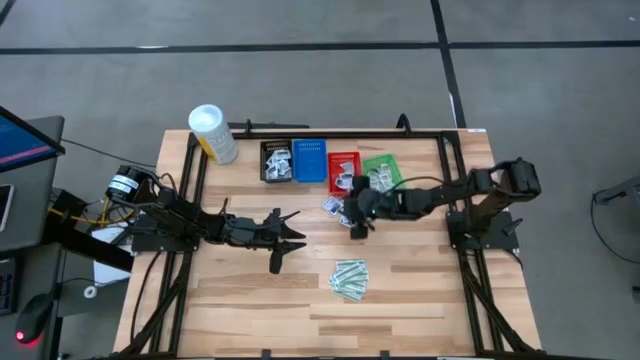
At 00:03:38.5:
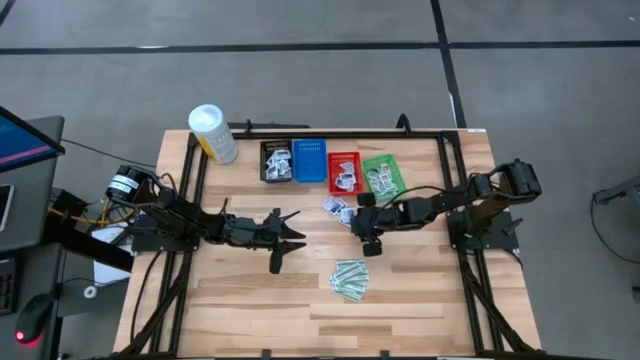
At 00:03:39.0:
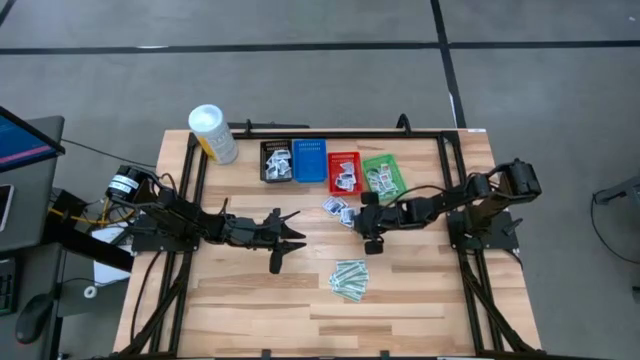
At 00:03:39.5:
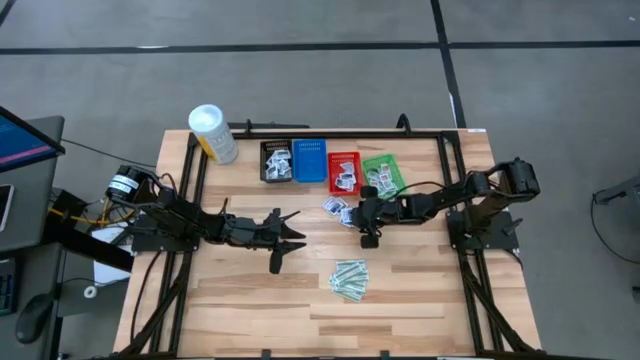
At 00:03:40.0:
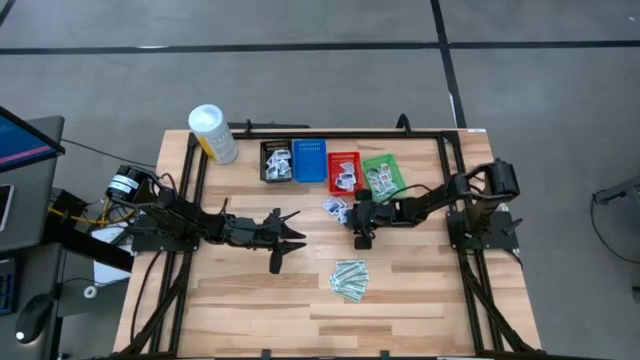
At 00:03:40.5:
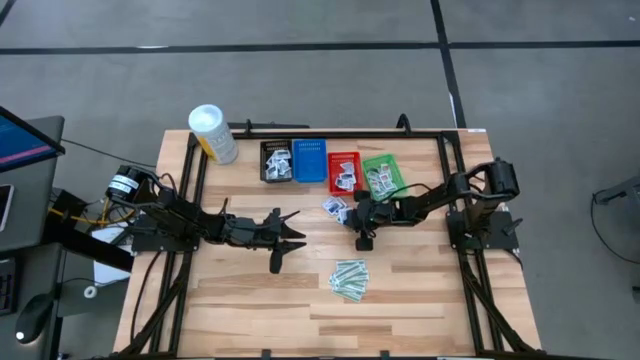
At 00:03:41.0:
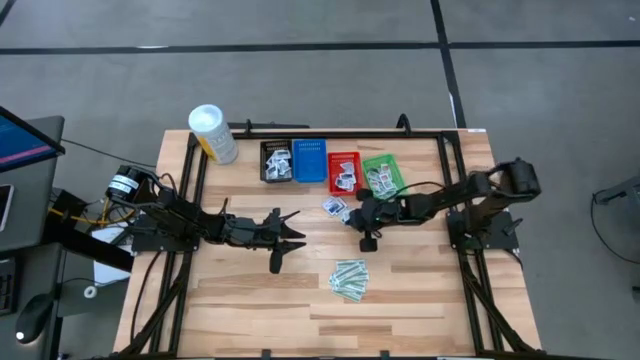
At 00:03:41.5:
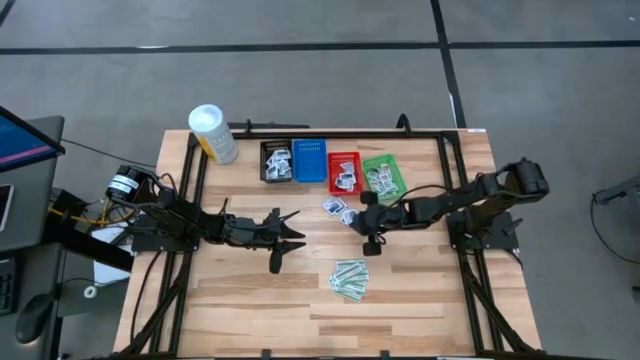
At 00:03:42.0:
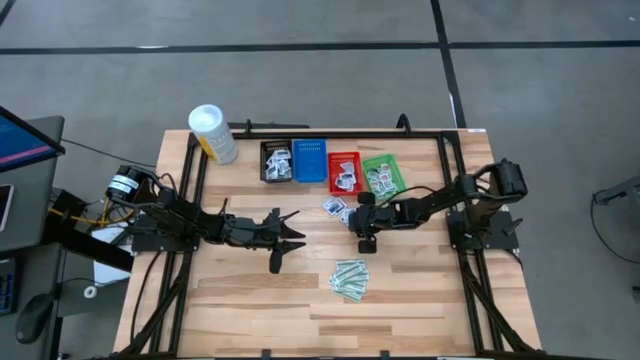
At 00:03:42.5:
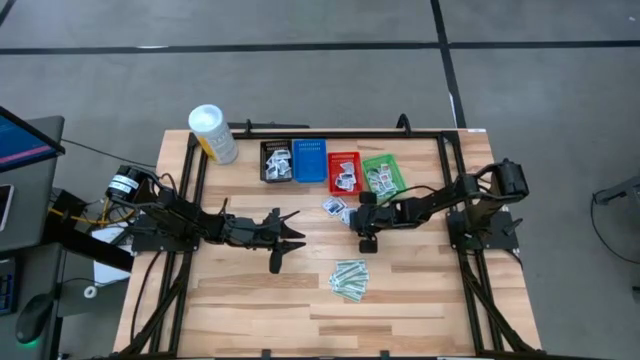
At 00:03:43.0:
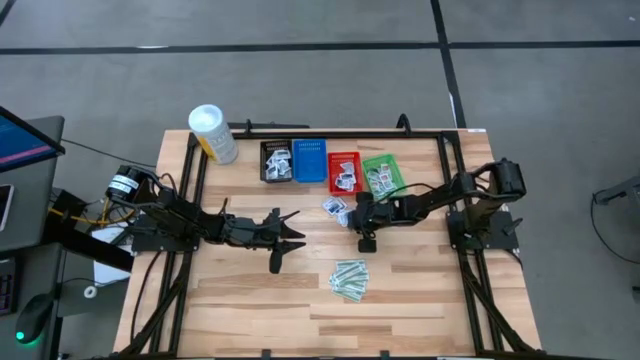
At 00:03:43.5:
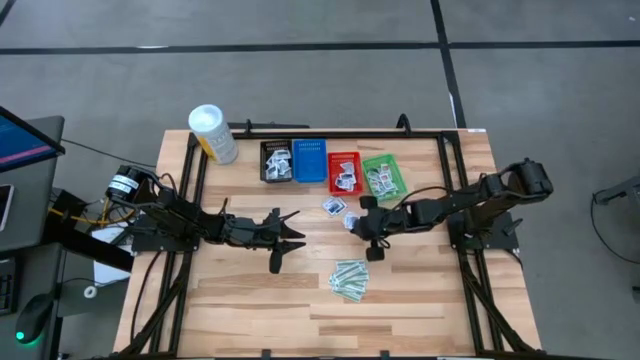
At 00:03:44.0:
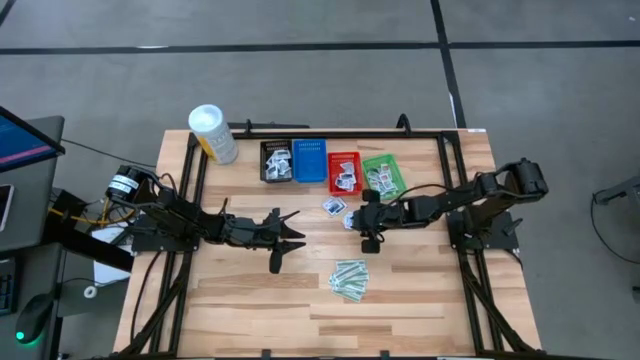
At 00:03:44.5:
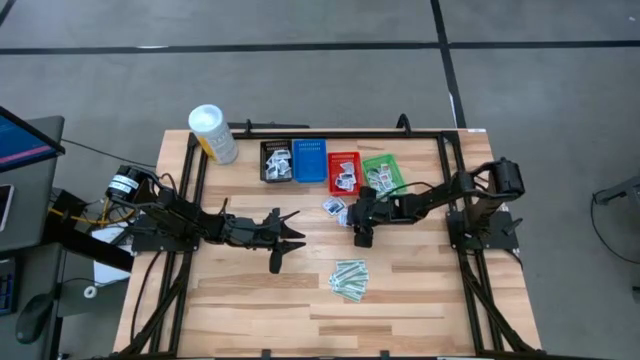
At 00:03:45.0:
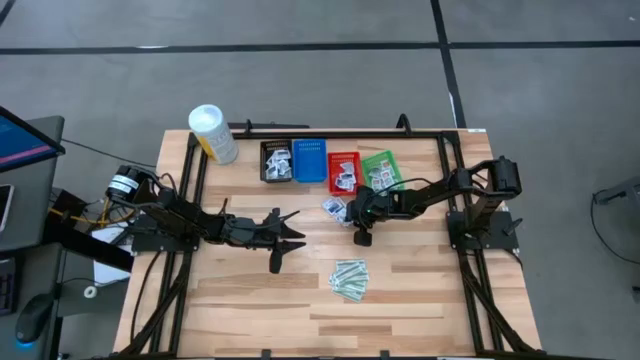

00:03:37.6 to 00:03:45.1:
Task: Pick & Place First Aid Supplies
Put the blue pad into the red bin

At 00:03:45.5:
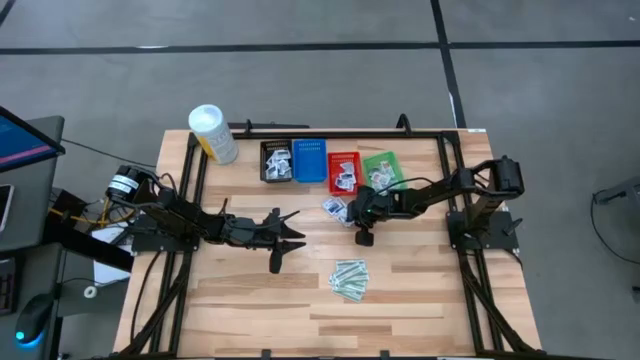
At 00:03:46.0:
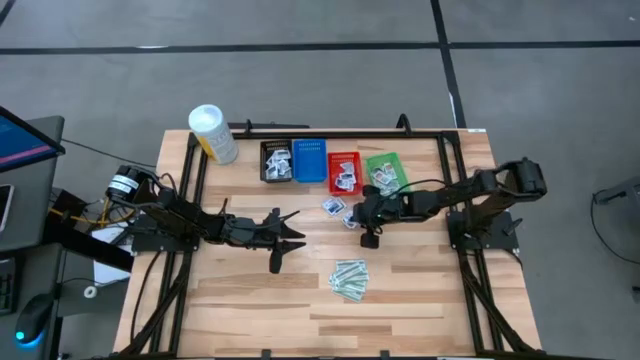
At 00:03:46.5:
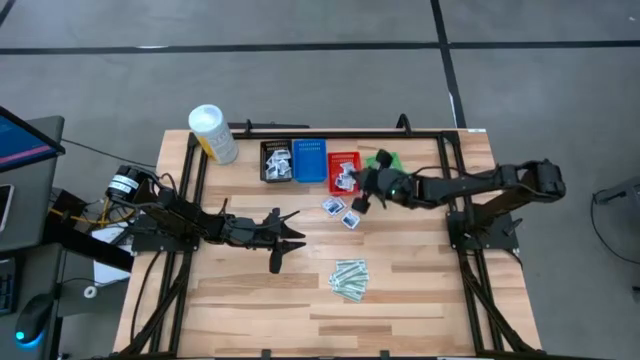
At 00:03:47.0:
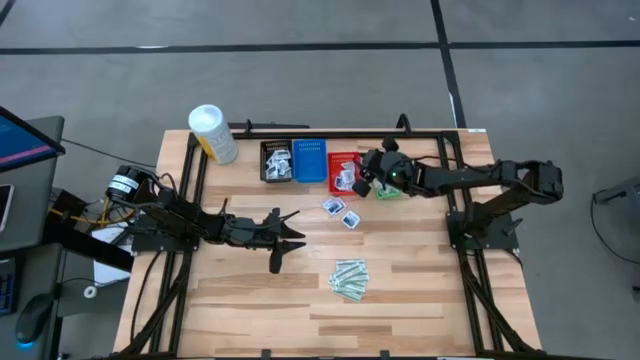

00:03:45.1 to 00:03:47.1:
Put the blue pad into the red bin

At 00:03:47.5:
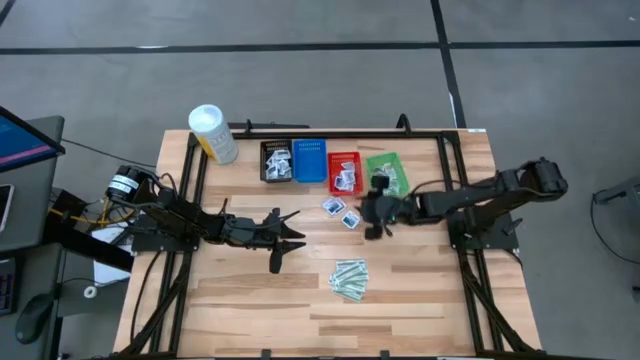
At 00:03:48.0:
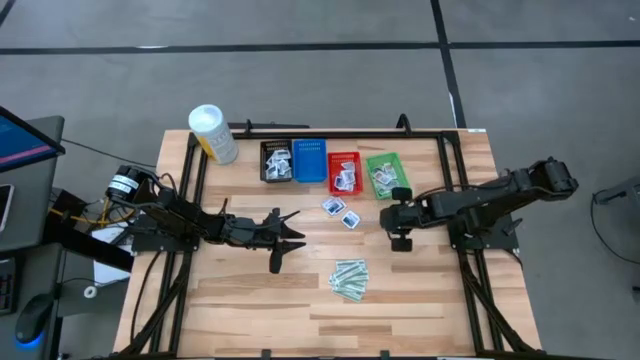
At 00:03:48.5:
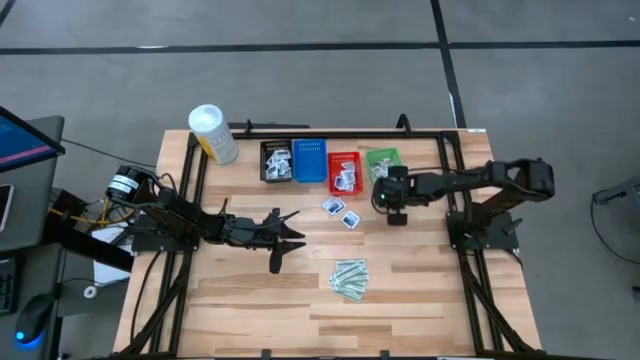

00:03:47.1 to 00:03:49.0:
Adjust the green bin on the table

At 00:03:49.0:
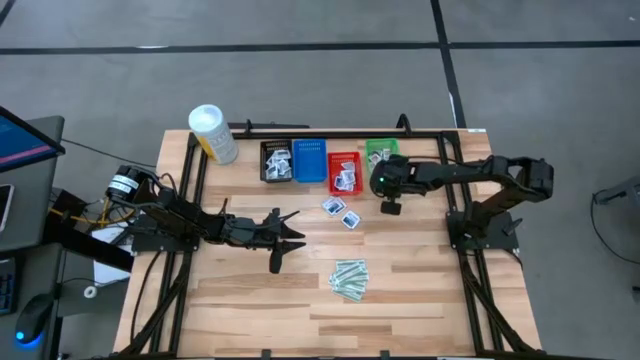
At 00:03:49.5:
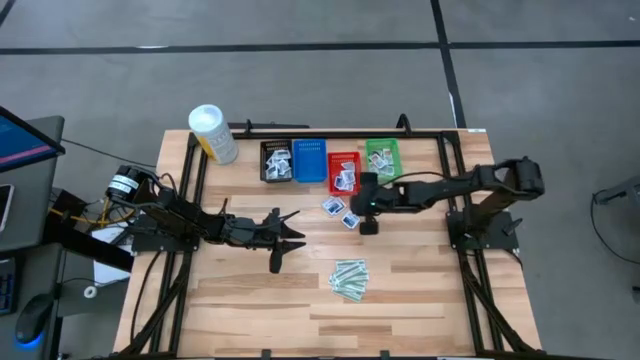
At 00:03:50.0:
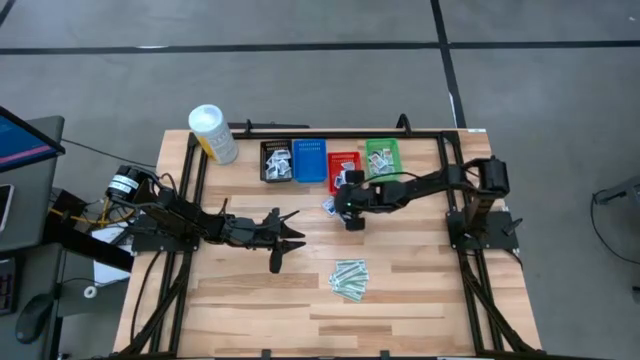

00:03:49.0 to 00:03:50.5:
Adjust the red bin on the table

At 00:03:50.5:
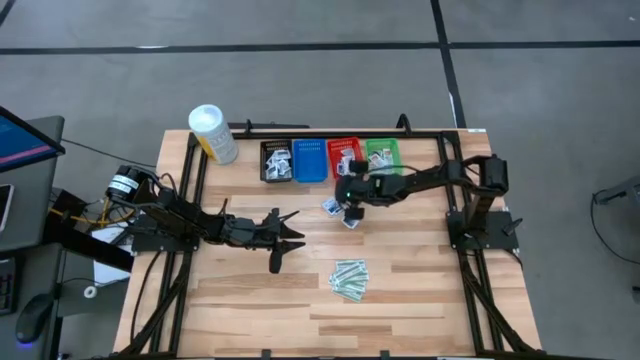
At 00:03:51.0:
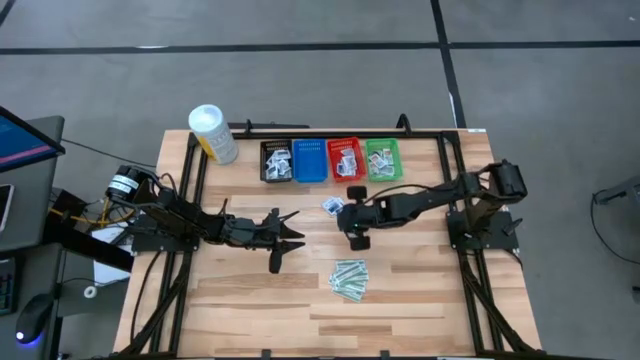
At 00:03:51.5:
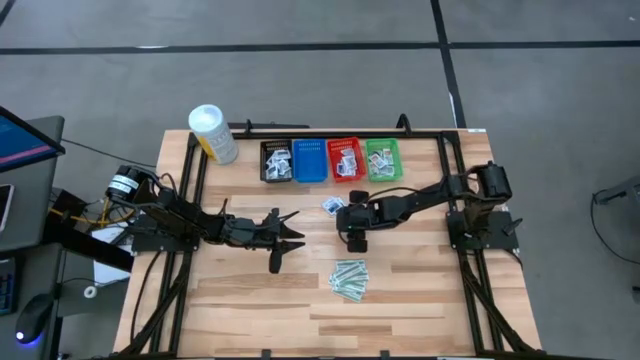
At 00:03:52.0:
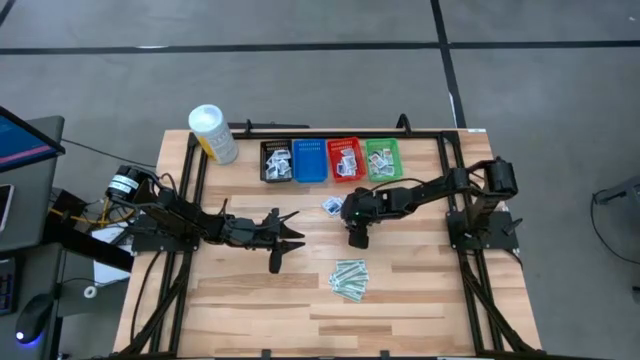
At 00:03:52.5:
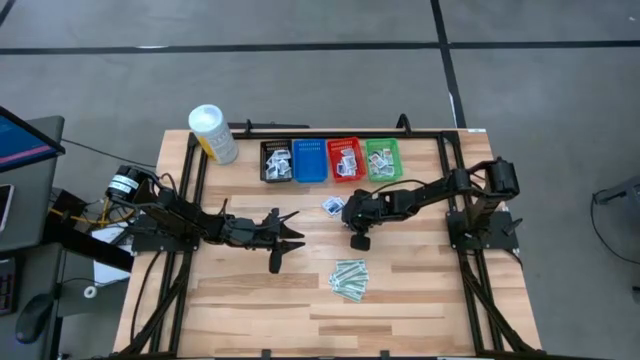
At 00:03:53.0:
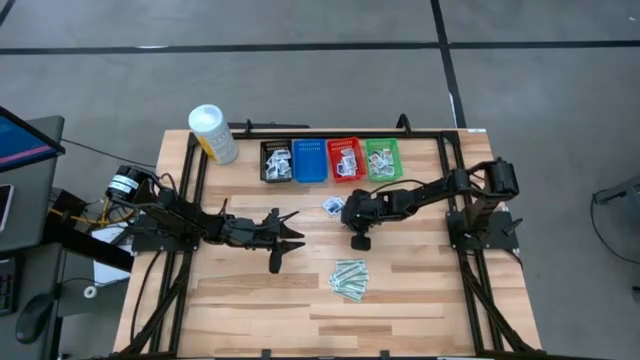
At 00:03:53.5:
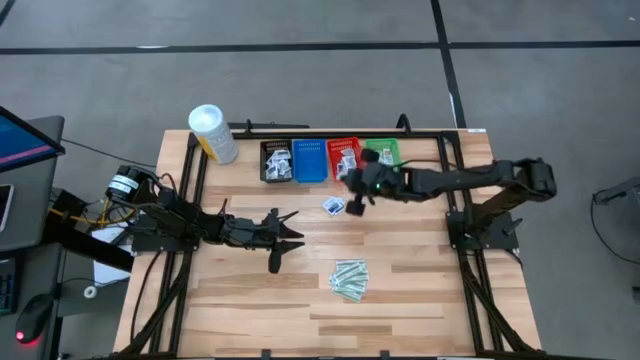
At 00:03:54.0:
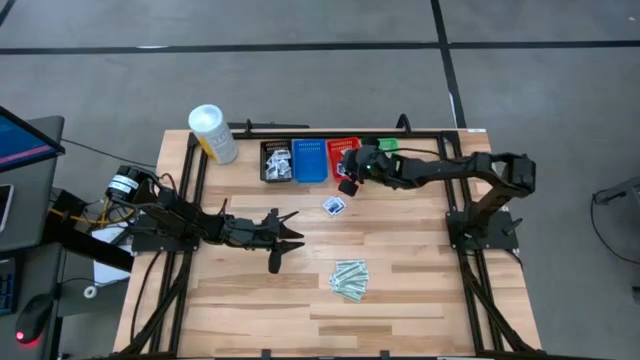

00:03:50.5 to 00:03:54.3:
Put the blue pad into the red bin

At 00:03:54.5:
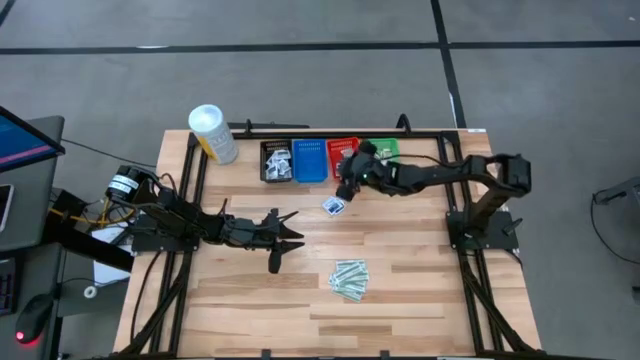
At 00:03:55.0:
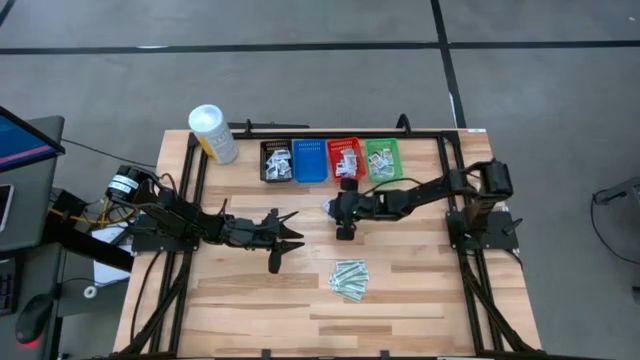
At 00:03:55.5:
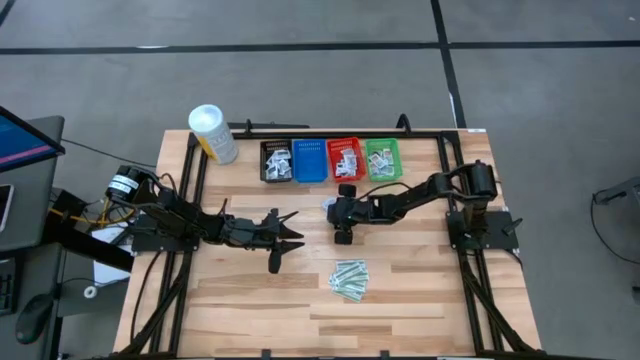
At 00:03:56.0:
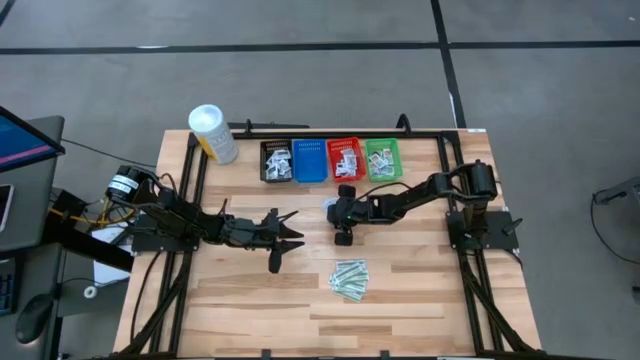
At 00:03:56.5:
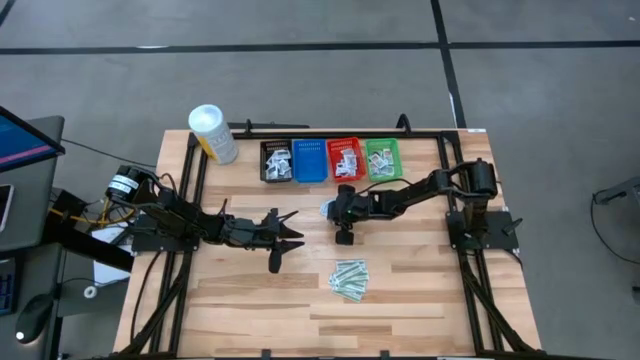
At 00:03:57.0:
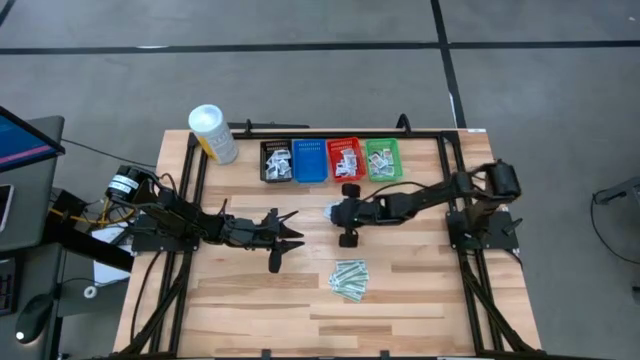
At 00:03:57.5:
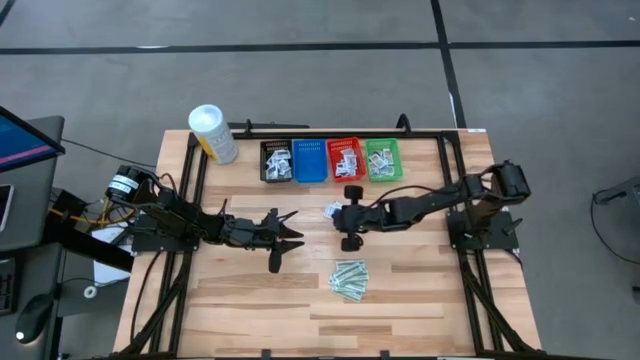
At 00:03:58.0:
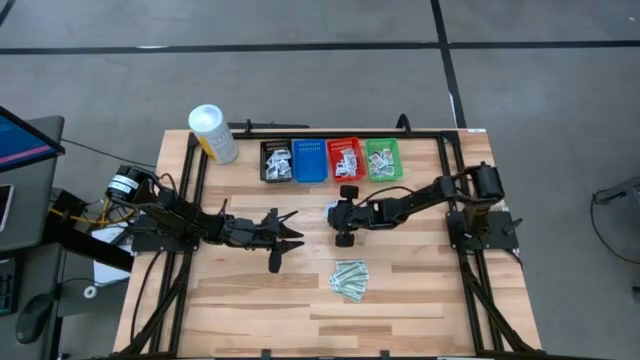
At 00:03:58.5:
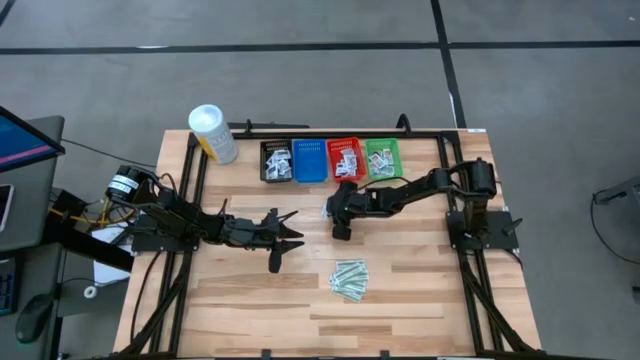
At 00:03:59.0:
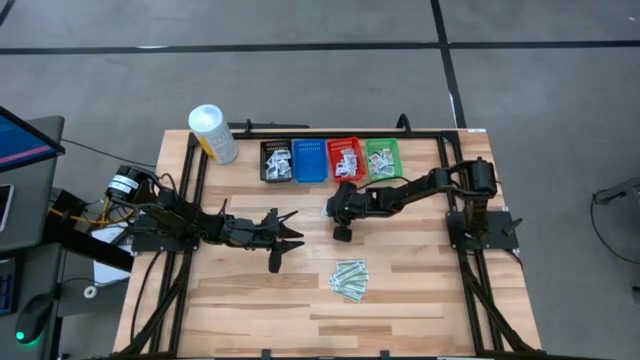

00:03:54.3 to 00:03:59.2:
Put the blue pad into the red bin

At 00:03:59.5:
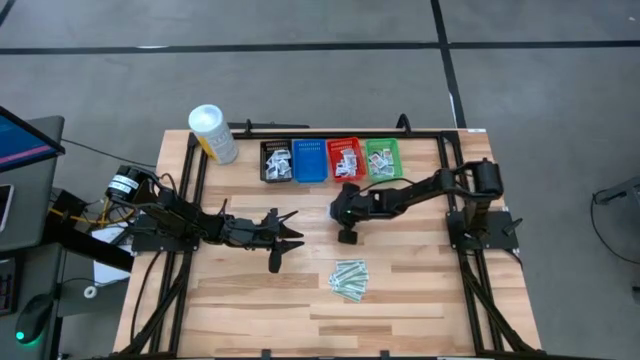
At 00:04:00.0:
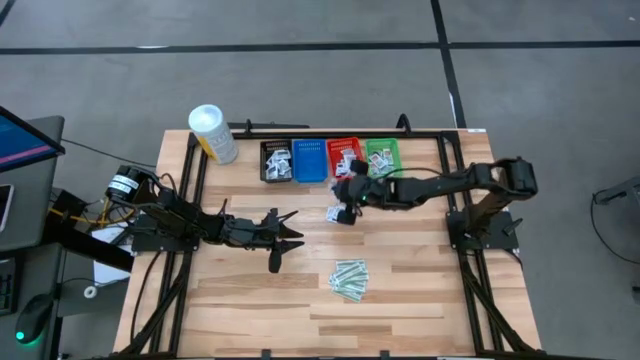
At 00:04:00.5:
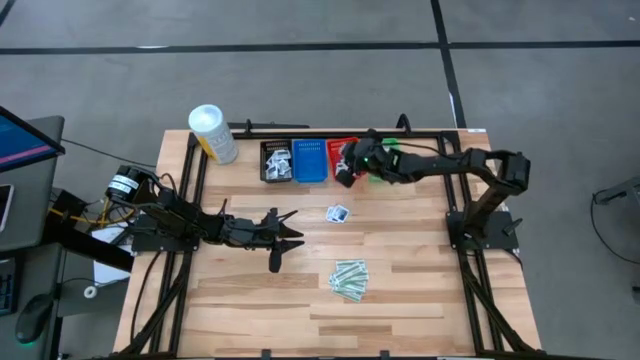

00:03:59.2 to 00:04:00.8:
Put the blue pad into the red bin
